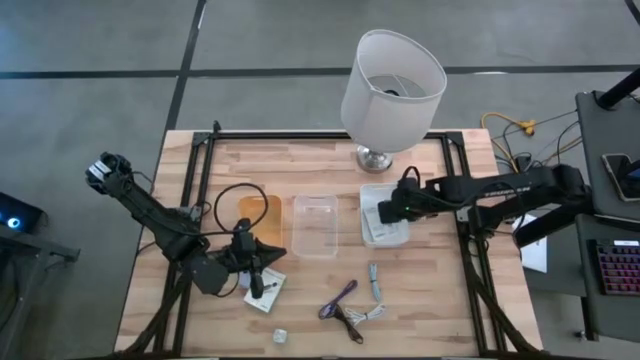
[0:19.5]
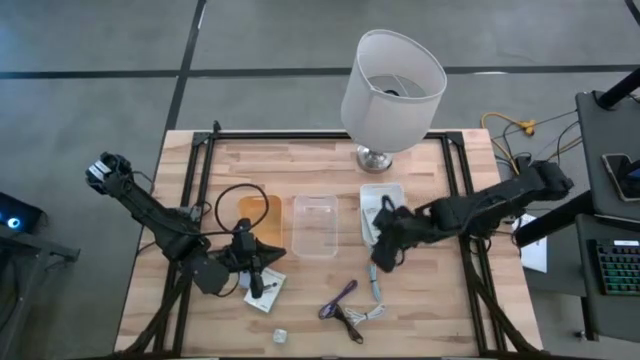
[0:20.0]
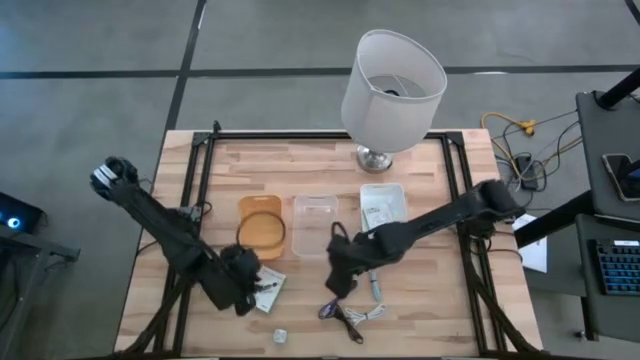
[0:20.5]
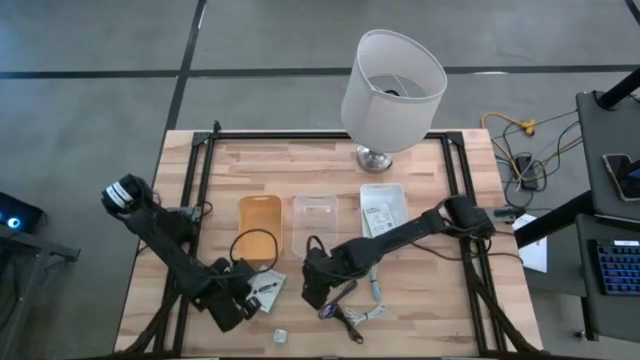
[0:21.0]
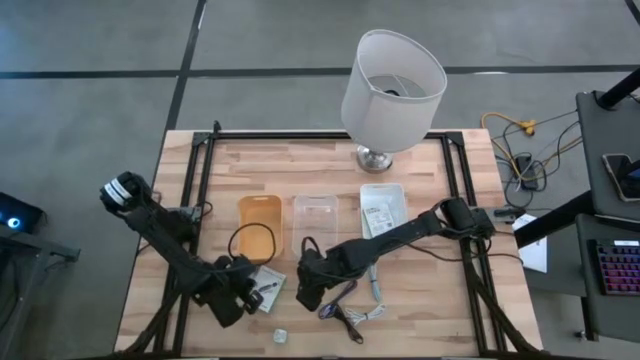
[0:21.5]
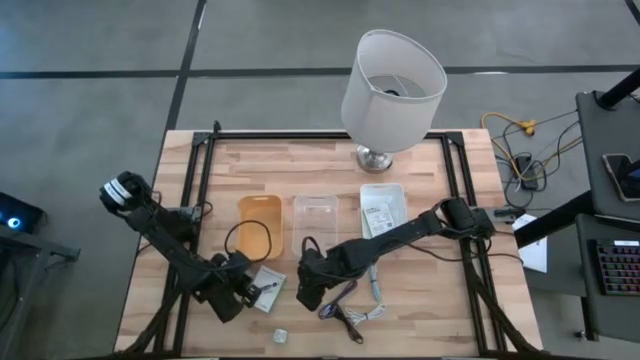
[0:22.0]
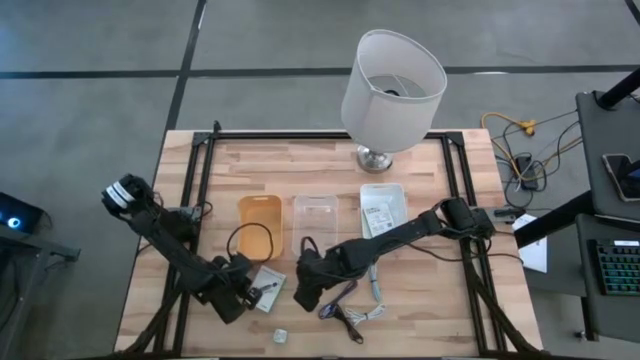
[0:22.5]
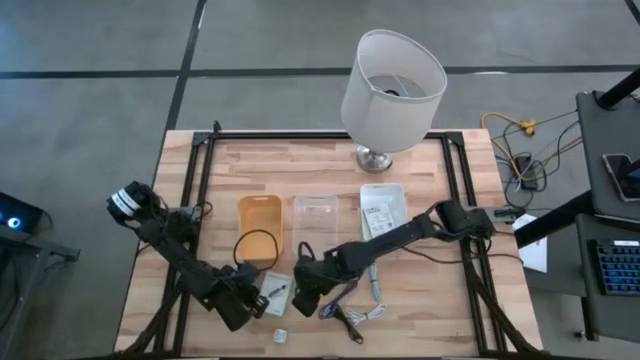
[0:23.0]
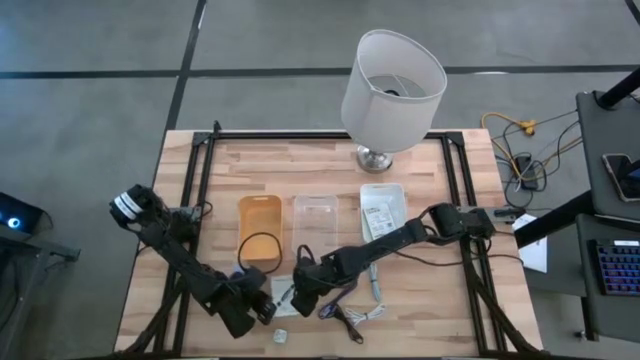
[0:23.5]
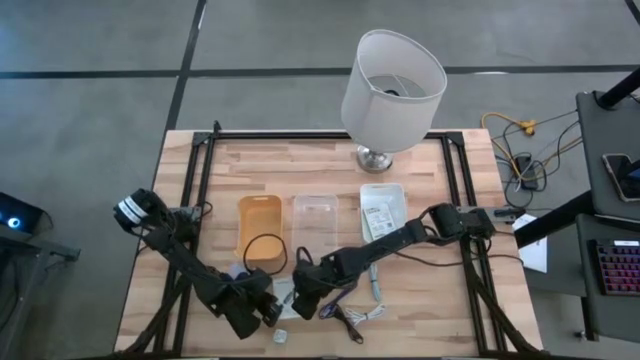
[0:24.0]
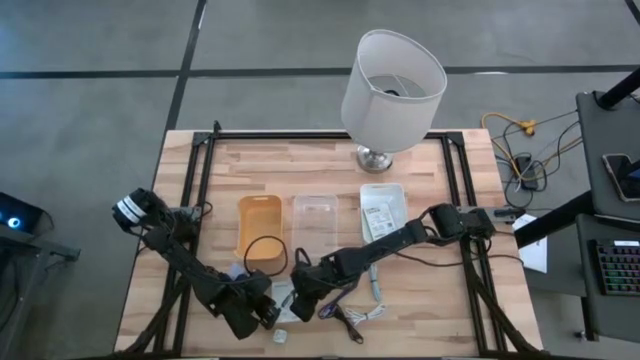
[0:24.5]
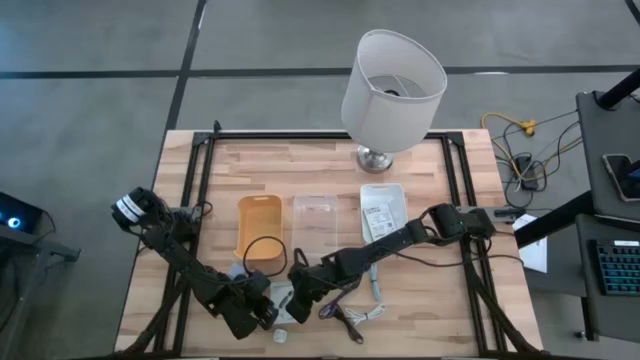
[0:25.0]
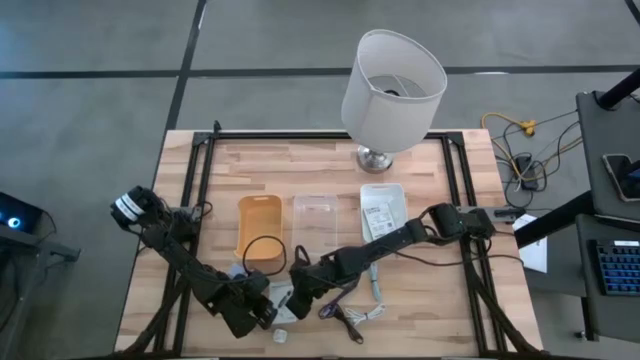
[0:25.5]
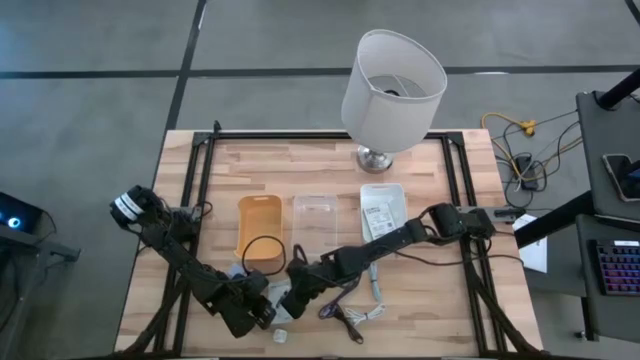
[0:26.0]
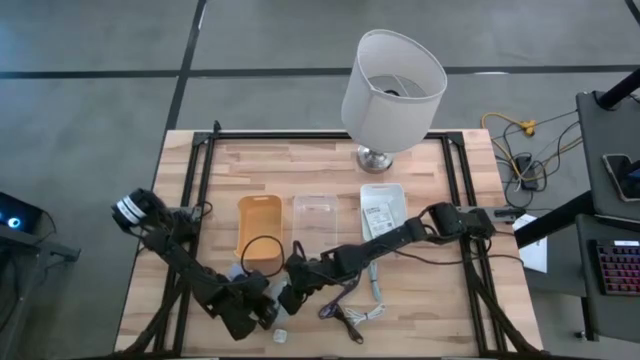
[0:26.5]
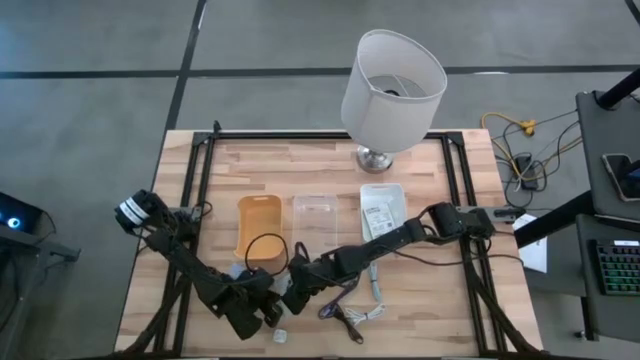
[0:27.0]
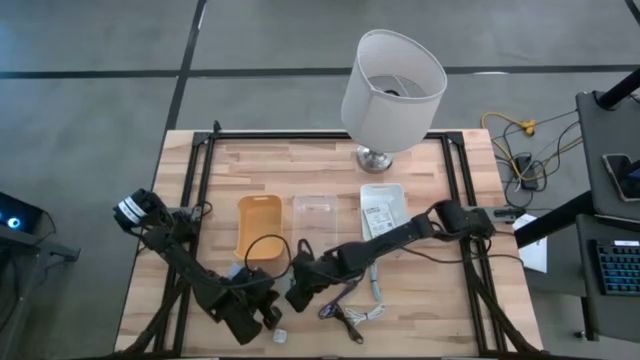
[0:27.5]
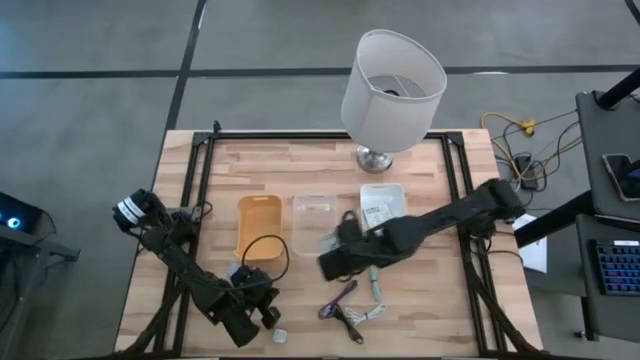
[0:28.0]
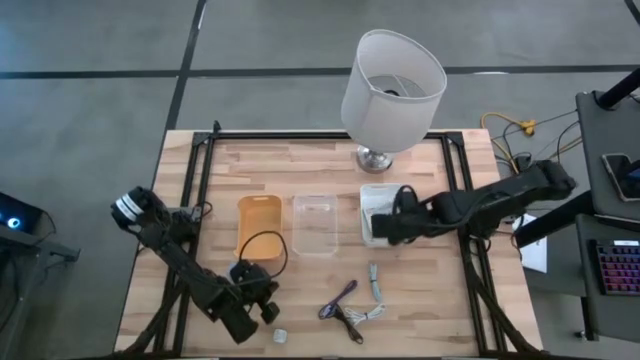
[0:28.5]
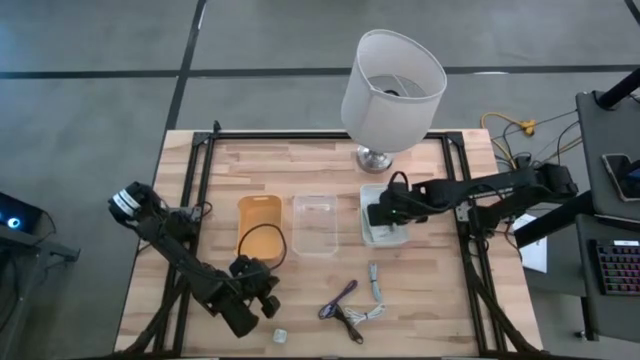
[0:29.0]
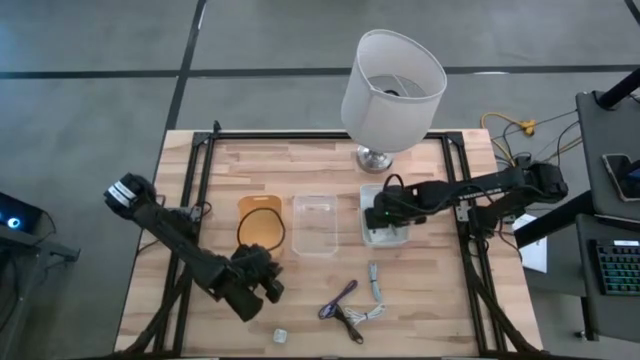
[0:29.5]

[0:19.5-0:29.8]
Task: Pick and place items into bin
Put the card reader box into the white bin

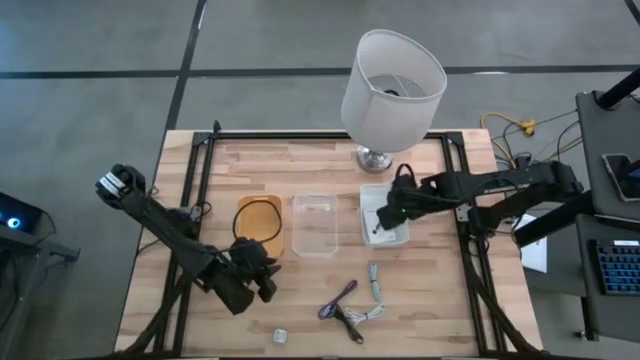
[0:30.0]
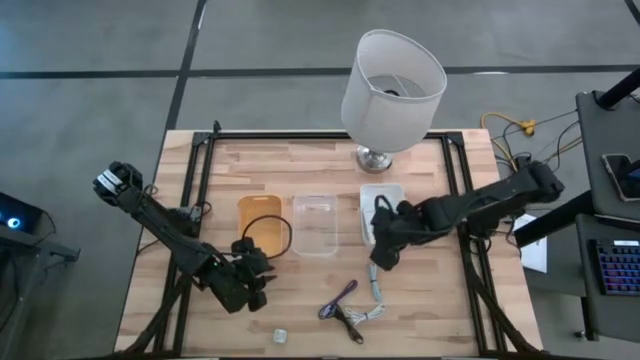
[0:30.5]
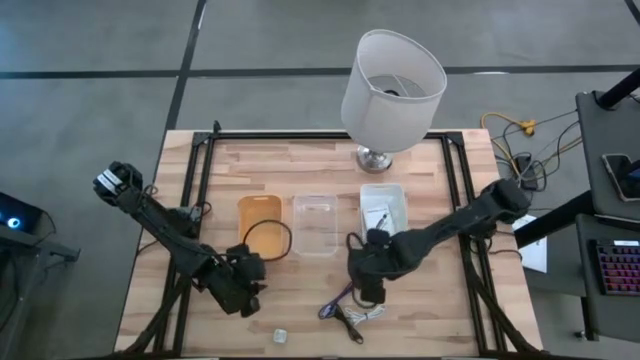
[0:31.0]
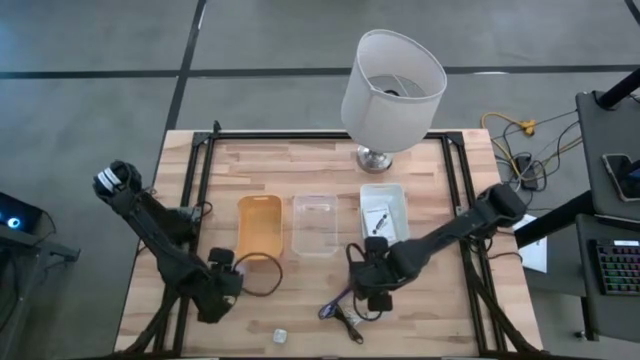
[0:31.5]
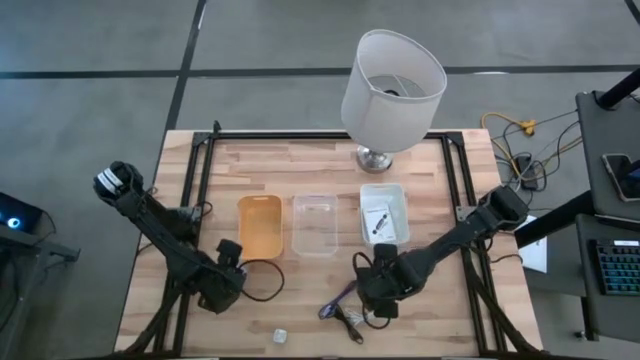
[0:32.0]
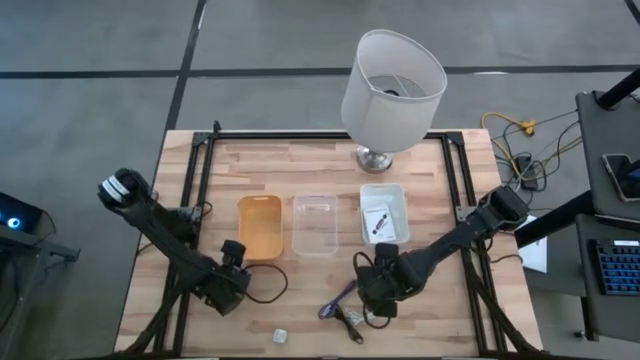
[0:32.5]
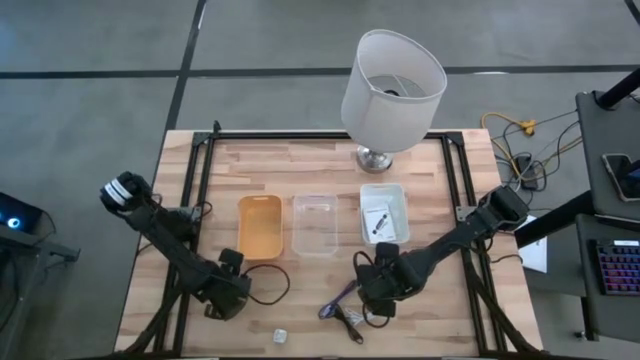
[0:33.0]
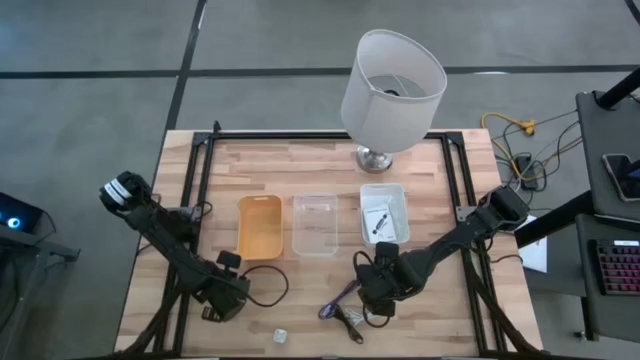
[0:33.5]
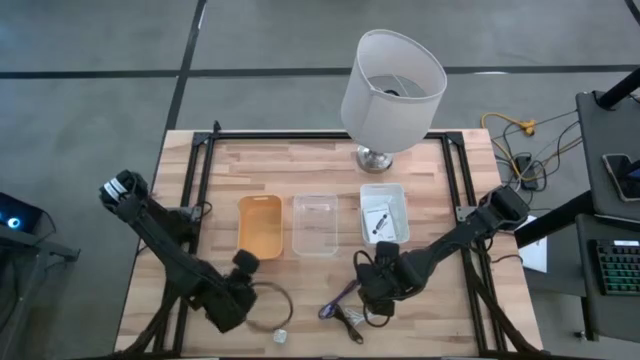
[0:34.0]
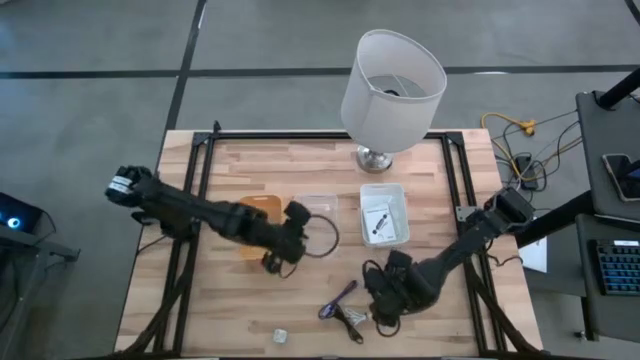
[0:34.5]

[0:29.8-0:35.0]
Put the white charger adapter into the transparent bin

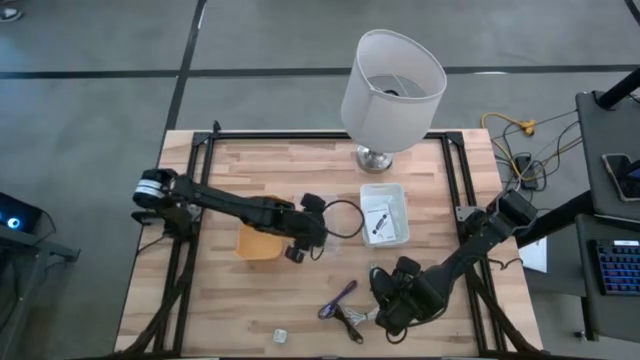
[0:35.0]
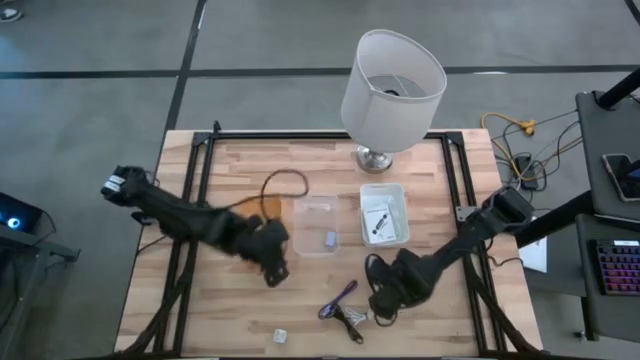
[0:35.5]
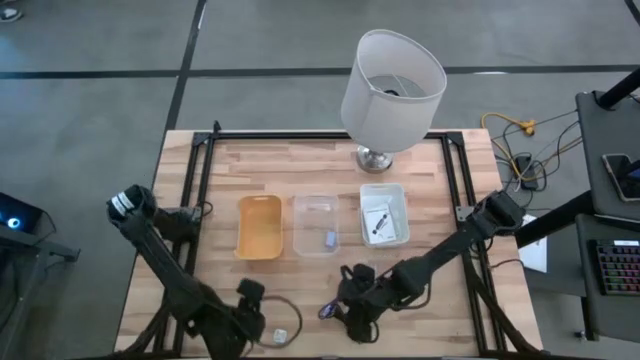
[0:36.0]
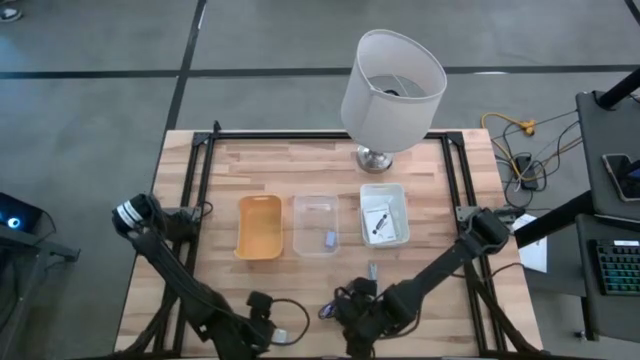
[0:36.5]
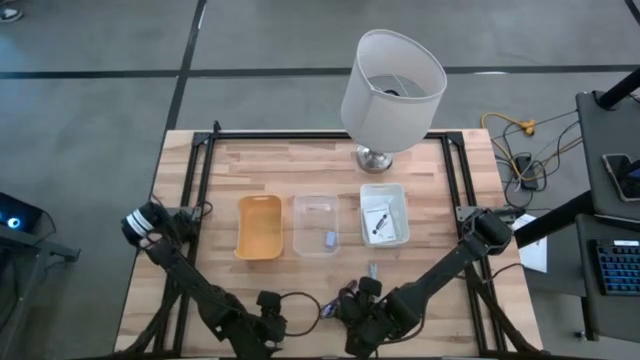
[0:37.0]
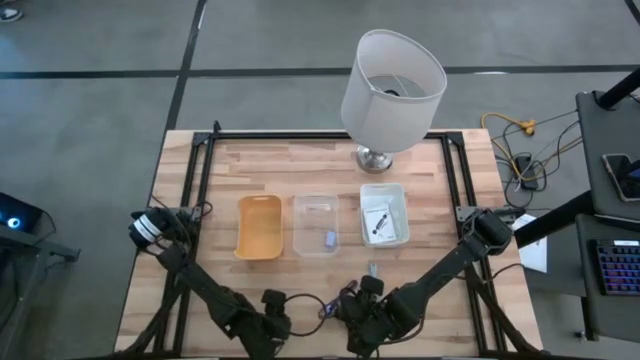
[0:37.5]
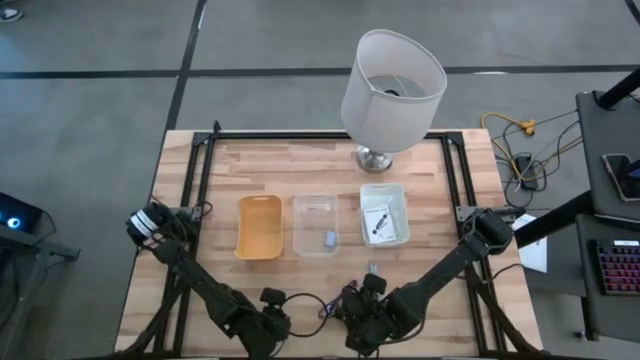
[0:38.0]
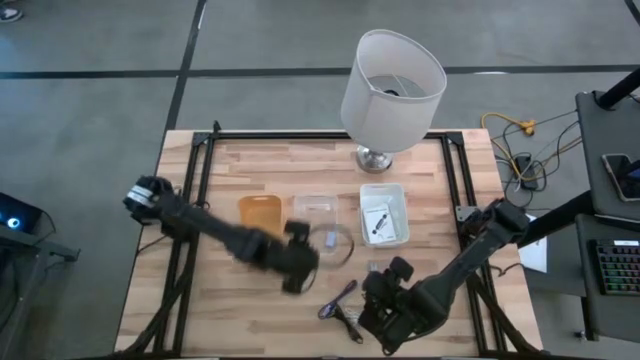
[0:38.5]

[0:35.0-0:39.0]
Put the green charger adapter into the transparent bin

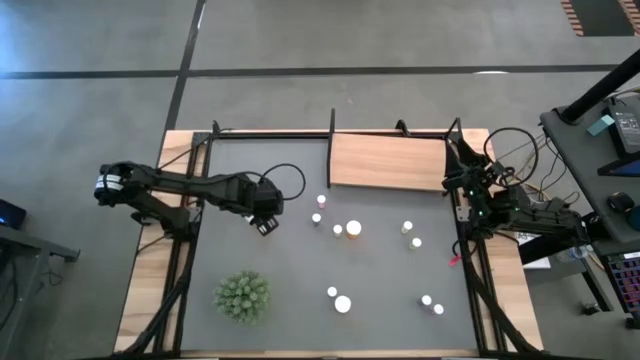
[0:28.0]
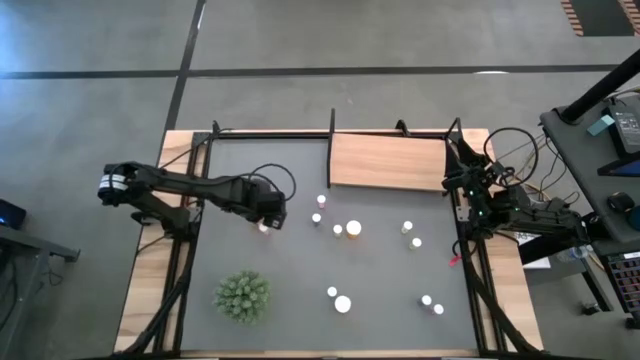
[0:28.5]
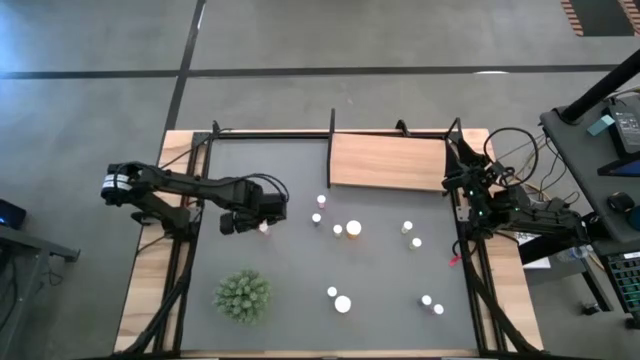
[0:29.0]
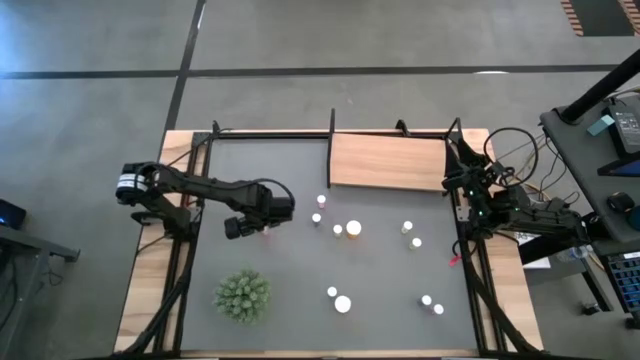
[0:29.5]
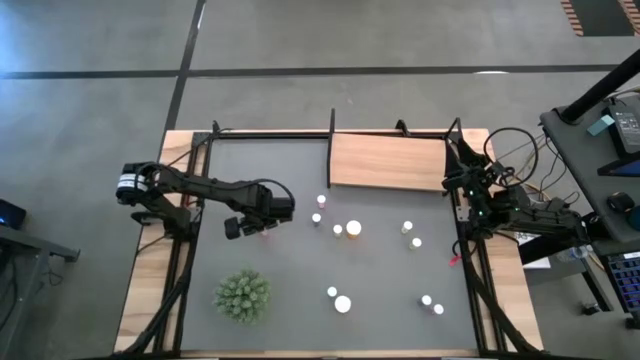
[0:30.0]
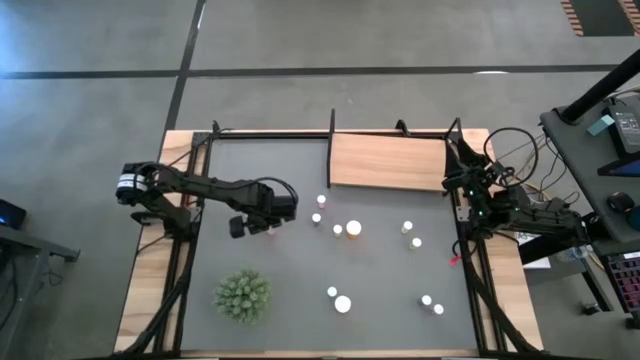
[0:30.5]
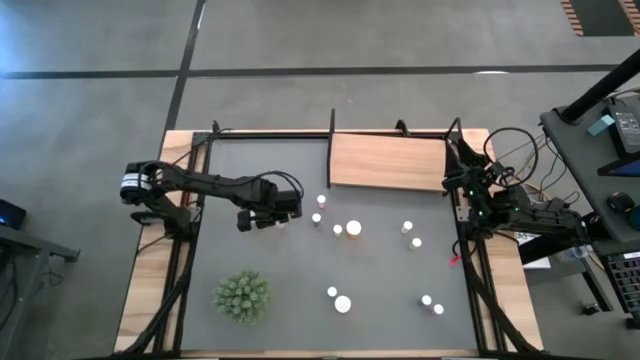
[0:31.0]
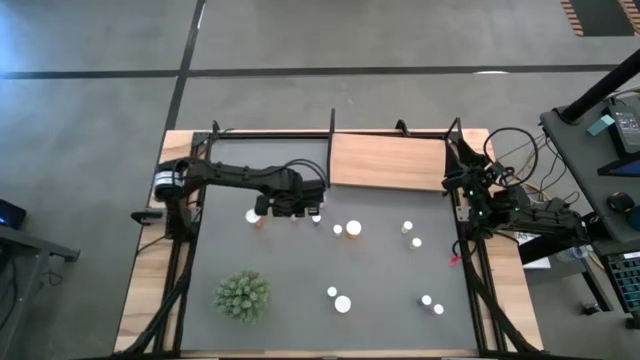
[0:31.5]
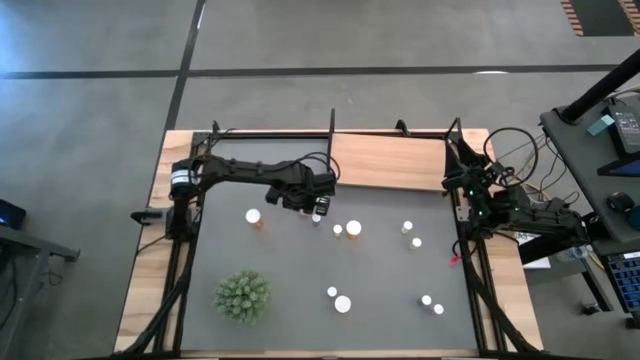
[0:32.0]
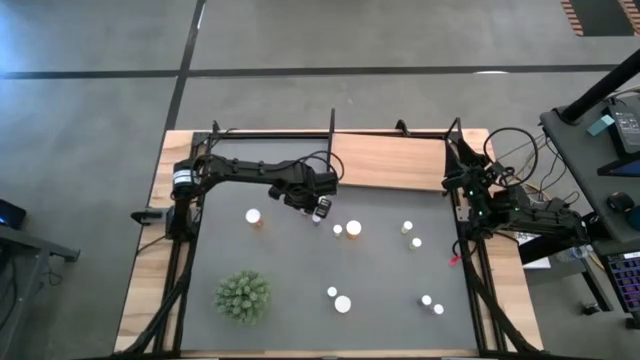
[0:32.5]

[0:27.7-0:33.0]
Task: Pick and place medicine bottles onto shelf by color
Move the left pink pill bottle to the center of the table
